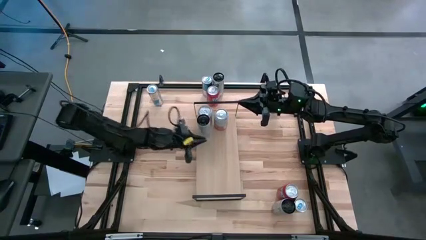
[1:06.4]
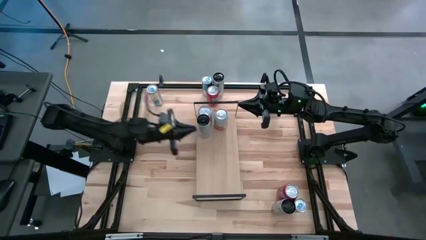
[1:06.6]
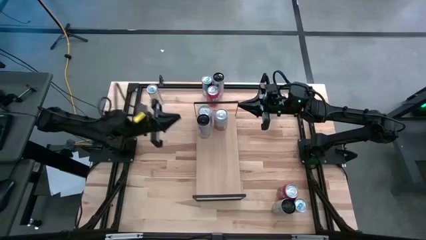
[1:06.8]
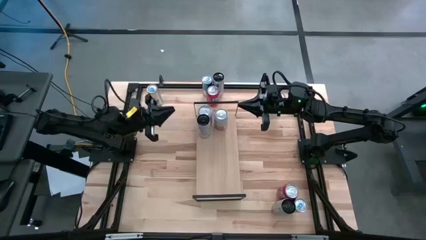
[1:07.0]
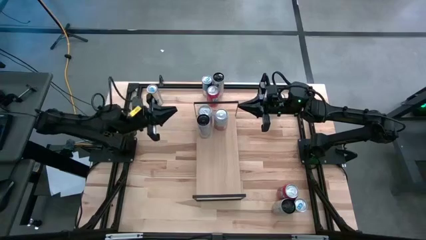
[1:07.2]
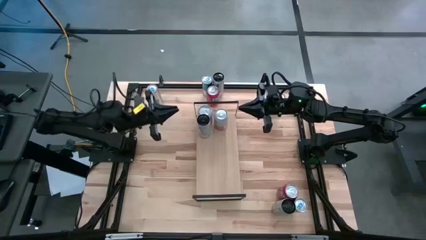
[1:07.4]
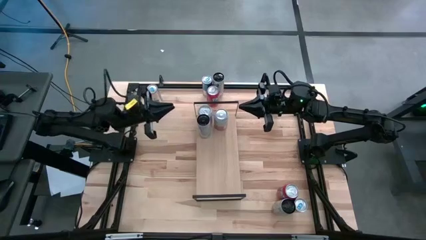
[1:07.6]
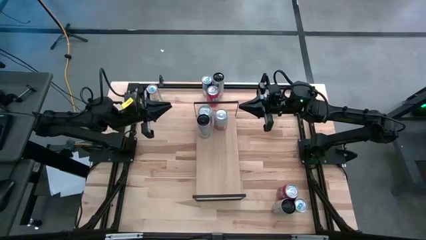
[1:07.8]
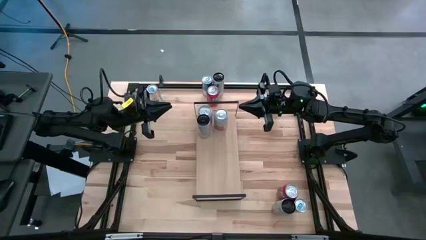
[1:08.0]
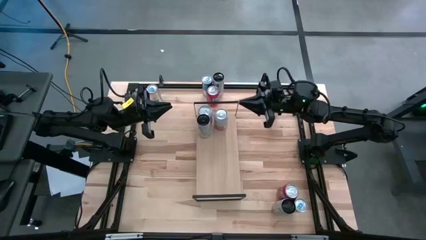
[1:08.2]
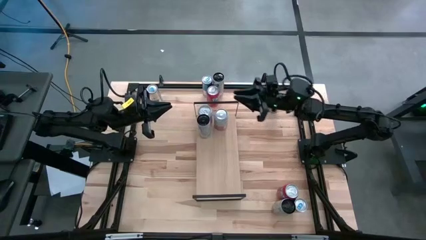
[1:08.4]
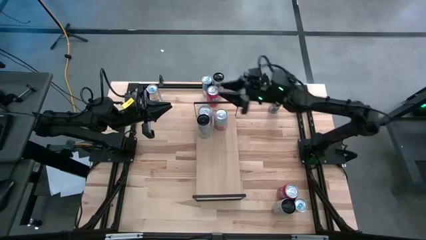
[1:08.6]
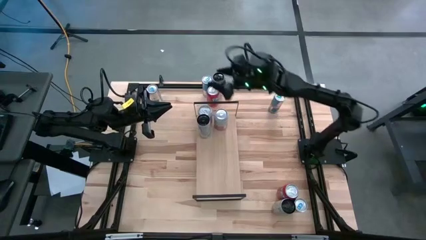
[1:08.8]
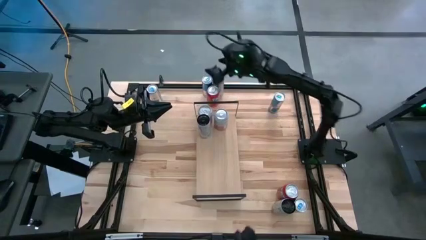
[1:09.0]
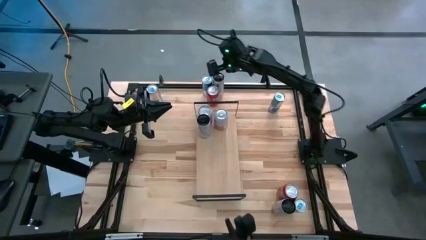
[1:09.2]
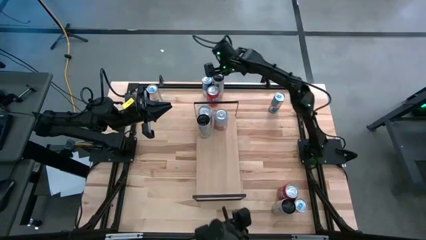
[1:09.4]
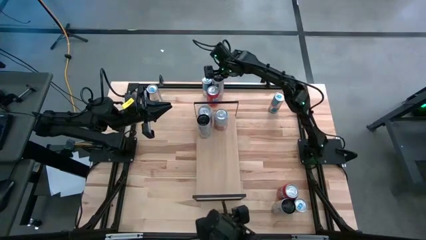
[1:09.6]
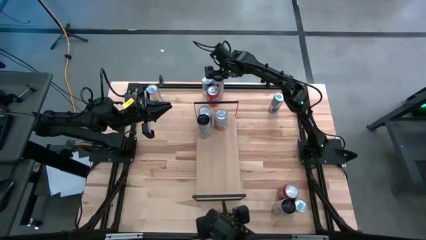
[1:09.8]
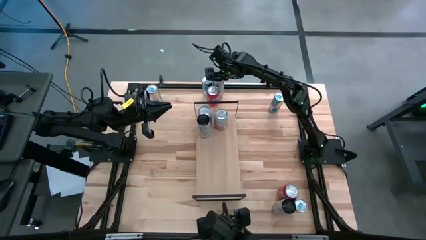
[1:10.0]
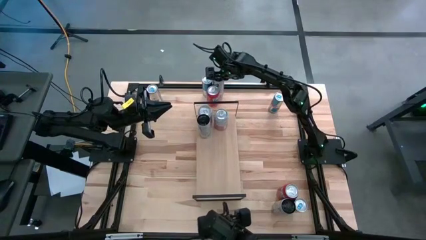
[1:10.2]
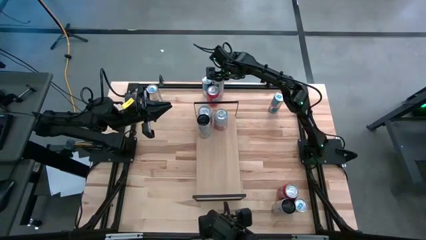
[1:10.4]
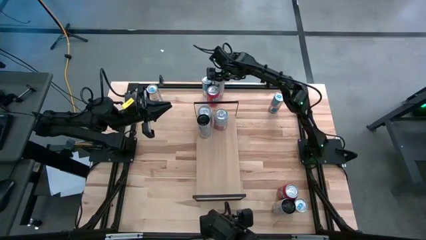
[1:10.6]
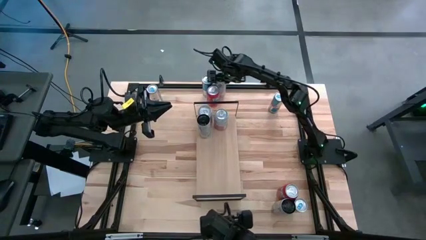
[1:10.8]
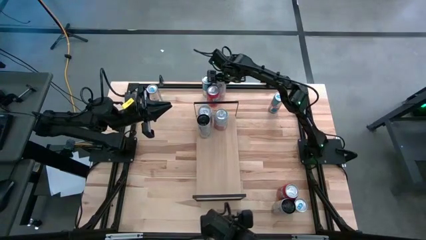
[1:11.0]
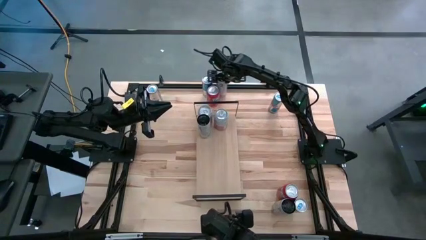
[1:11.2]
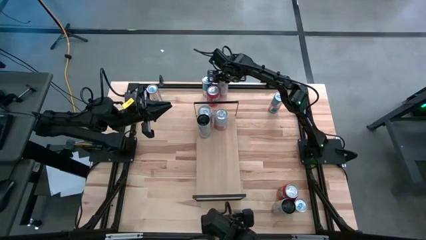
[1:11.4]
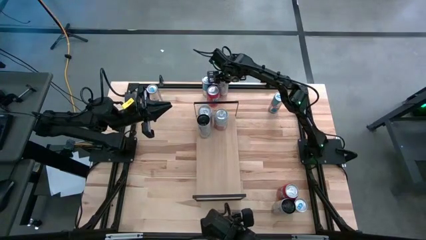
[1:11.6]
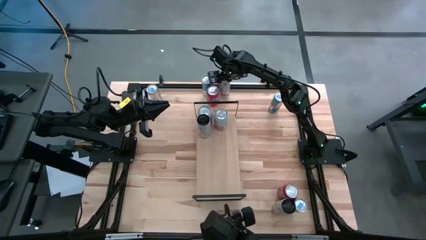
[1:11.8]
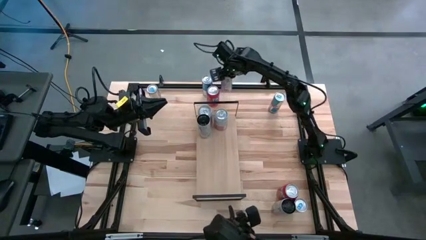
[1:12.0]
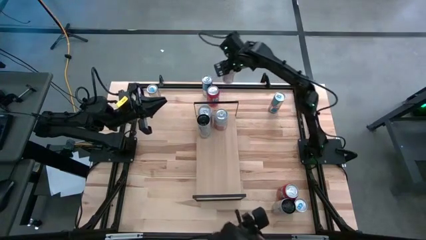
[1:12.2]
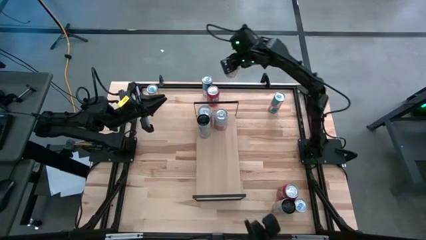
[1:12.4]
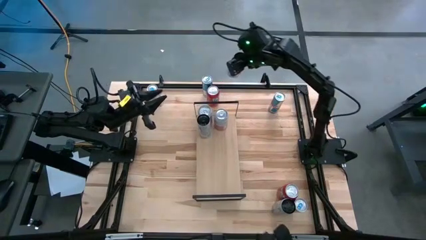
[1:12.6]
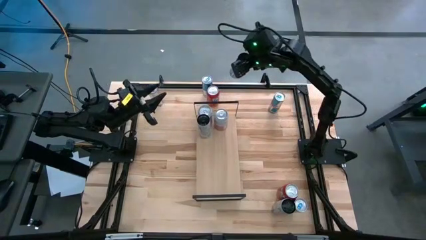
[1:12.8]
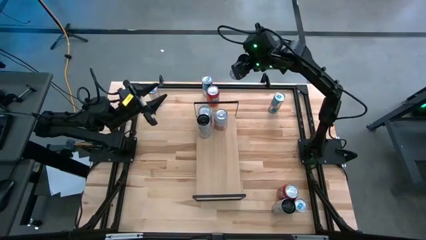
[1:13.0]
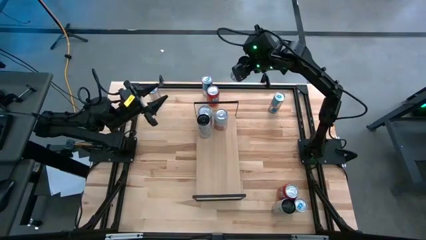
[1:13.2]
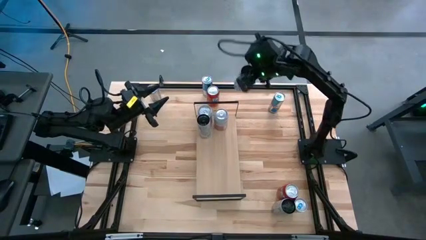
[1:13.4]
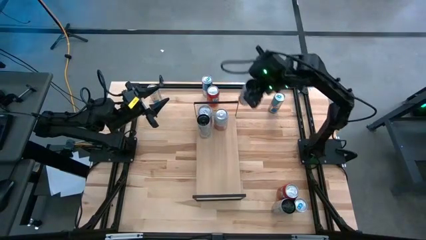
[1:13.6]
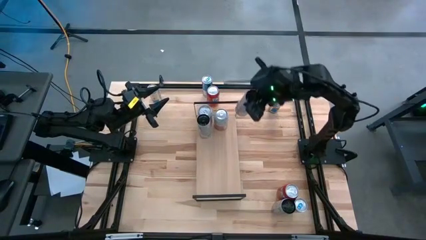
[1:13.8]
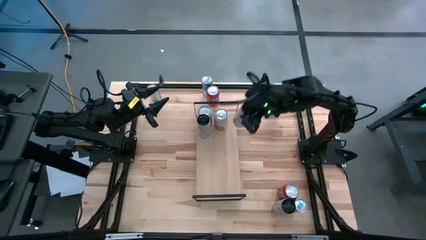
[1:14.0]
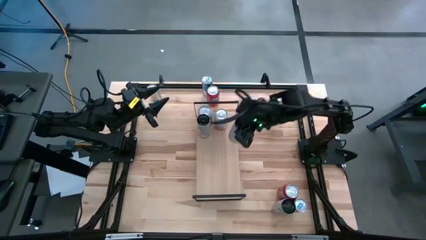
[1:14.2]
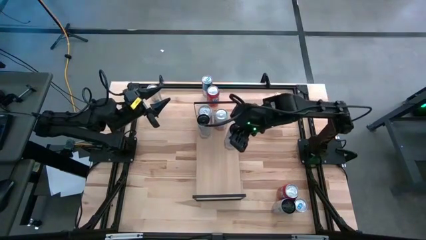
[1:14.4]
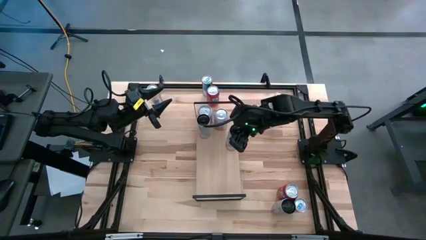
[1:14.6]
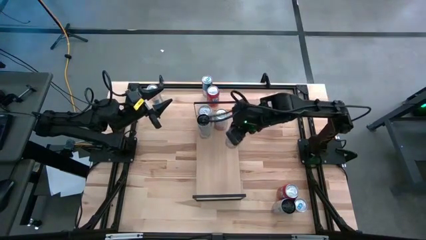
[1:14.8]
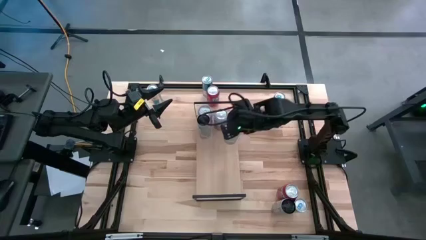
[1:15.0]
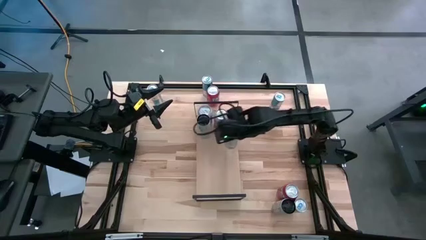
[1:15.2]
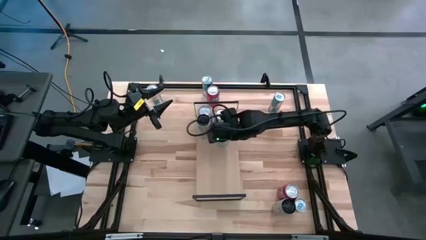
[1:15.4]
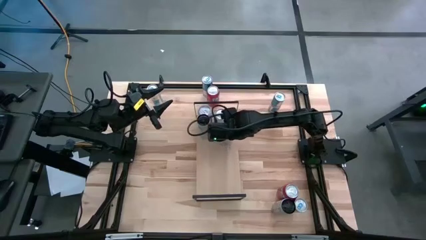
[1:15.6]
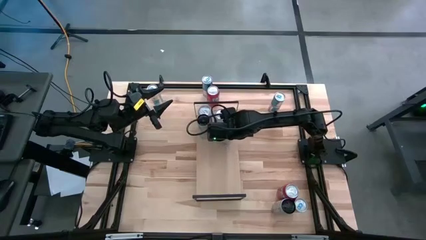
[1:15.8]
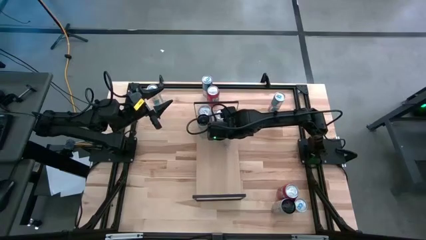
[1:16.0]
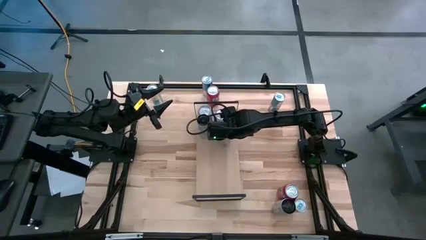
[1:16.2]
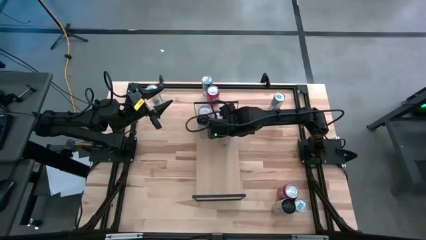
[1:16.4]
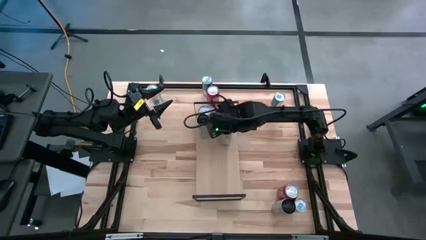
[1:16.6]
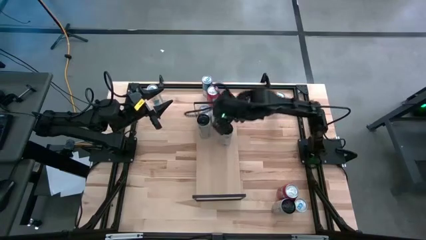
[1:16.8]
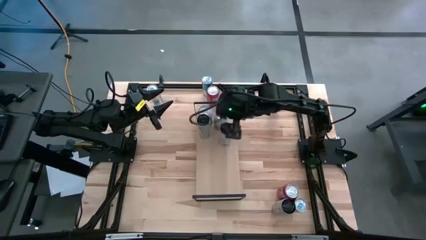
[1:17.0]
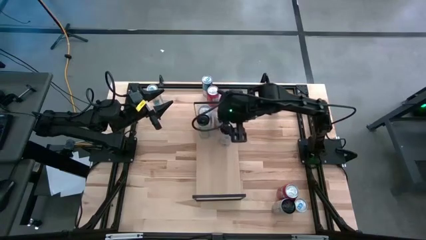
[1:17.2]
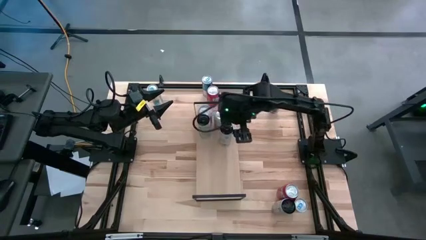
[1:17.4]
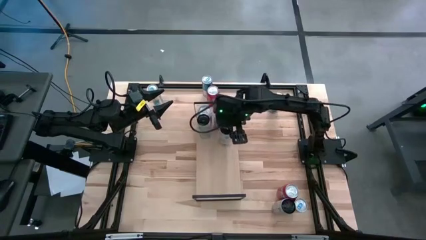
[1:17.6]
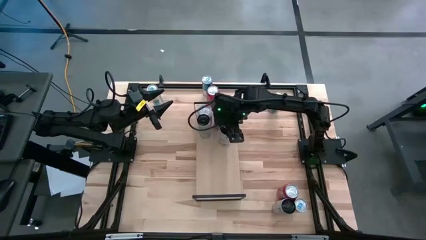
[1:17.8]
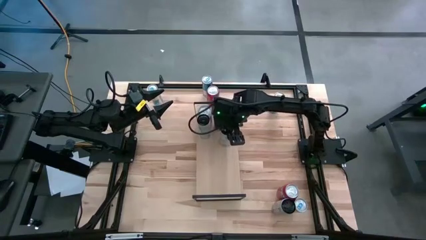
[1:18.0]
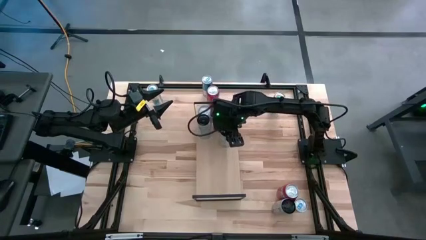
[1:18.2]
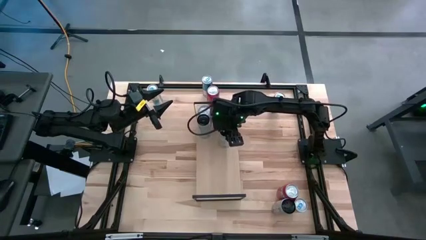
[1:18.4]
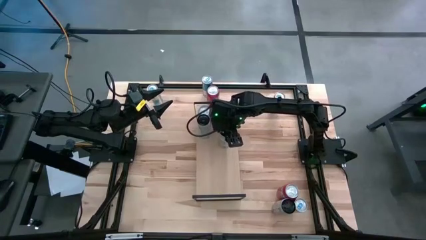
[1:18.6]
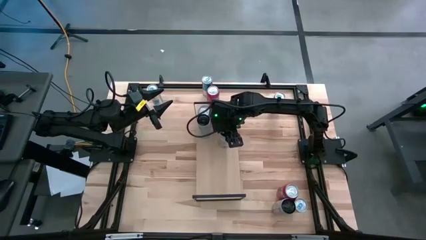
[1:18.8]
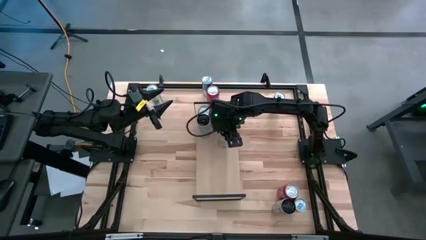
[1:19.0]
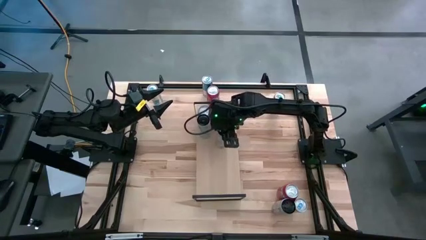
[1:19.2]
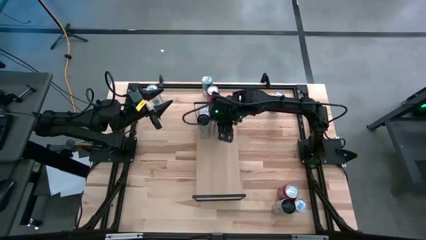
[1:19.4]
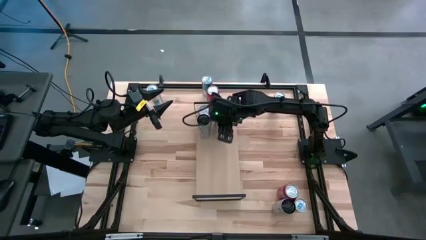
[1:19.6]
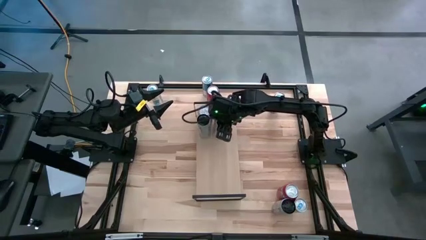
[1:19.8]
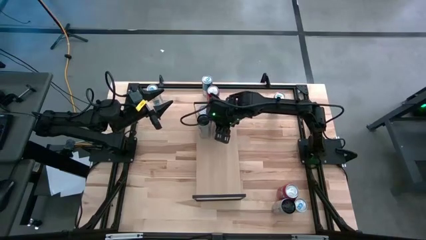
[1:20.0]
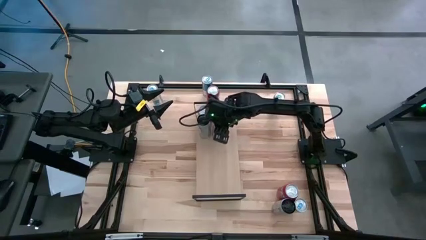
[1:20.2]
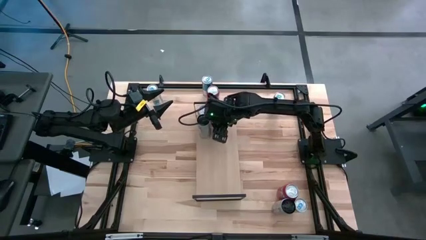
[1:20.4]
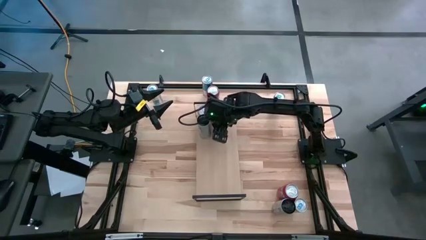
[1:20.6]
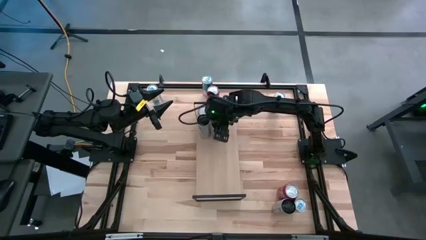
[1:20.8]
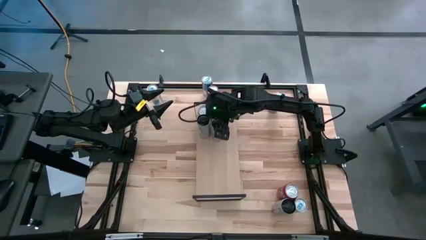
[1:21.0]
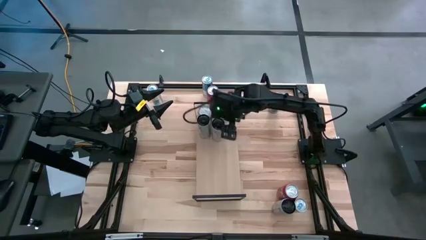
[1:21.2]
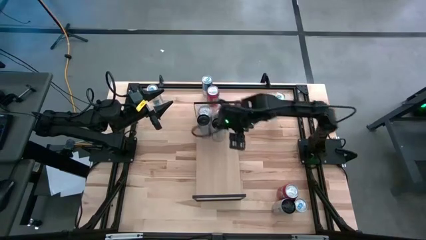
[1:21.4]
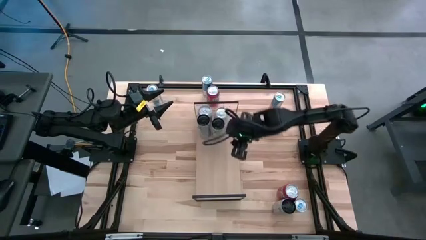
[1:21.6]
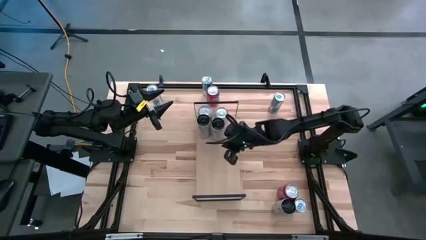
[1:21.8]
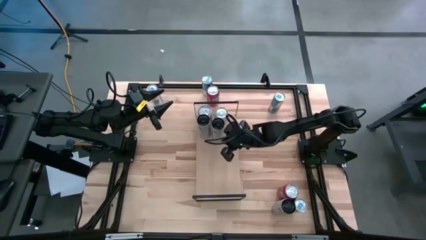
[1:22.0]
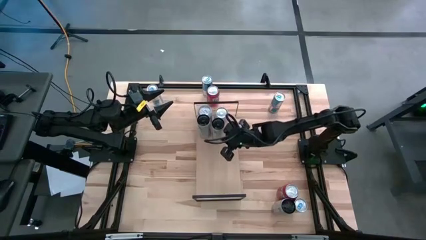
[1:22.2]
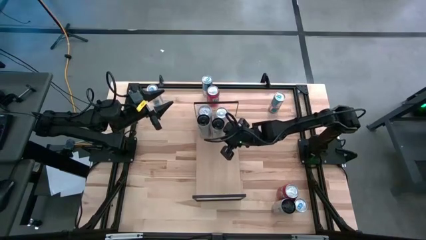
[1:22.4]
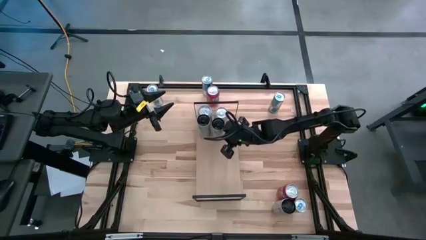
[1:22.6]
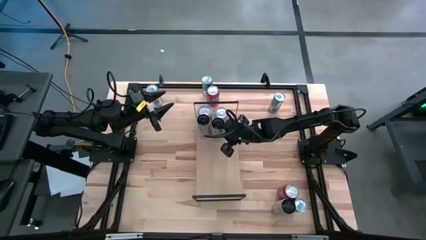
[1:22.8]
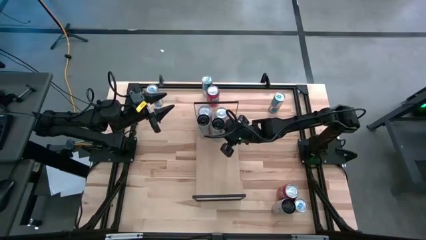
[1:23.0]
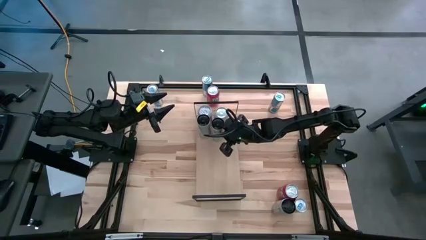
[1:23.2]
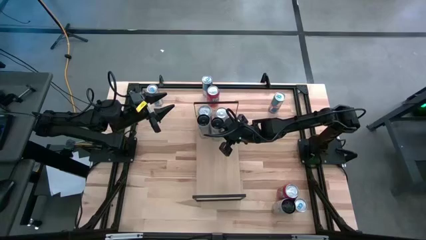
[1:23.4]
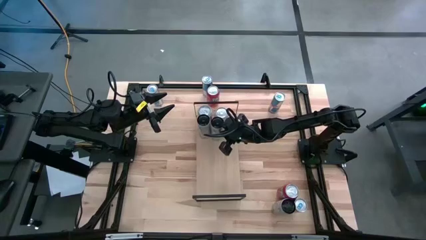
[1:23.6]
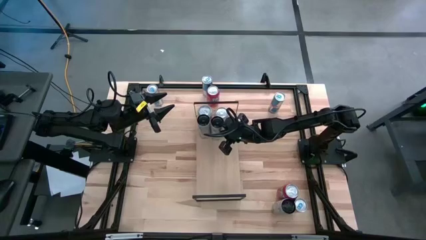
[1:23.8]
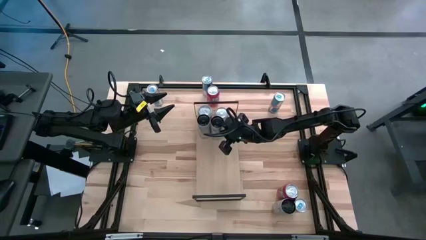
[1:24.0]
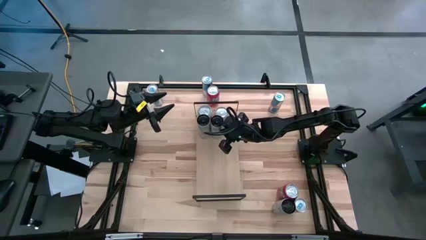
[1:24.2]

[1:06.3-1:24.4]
Task: Place canned beverage on shelf
Put the top white pink soda can on the shelf aligned with the other white pink soda can
